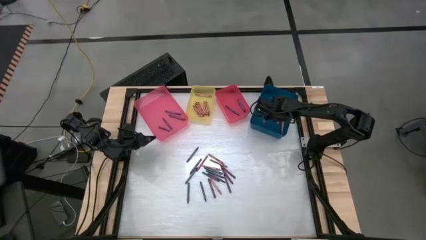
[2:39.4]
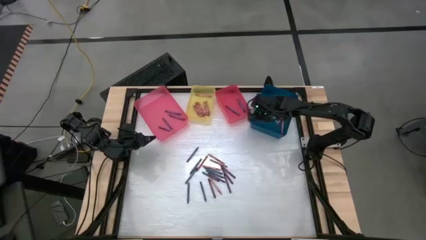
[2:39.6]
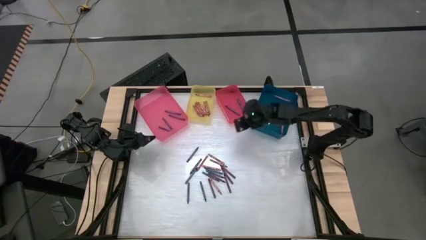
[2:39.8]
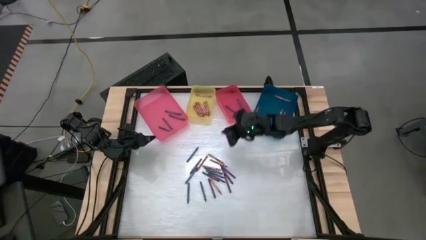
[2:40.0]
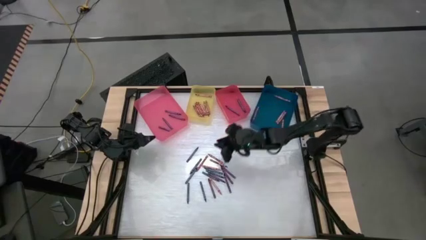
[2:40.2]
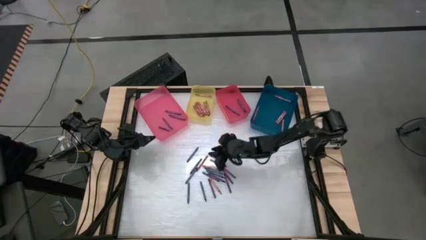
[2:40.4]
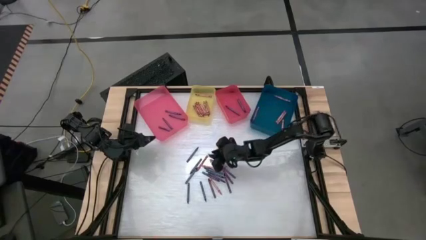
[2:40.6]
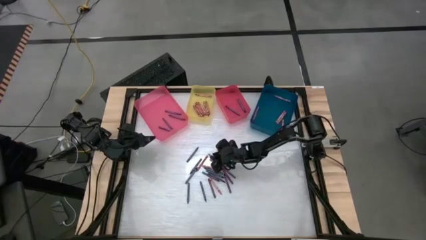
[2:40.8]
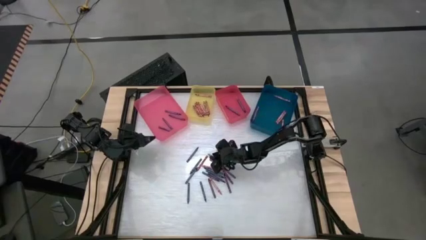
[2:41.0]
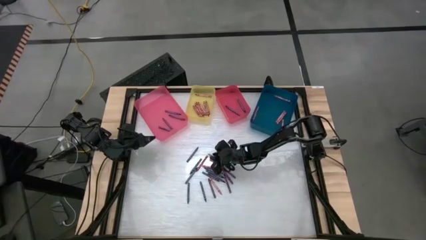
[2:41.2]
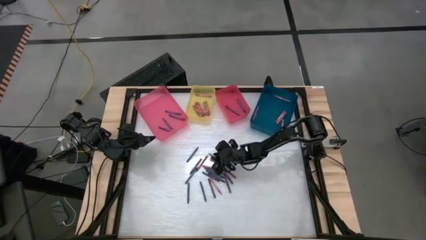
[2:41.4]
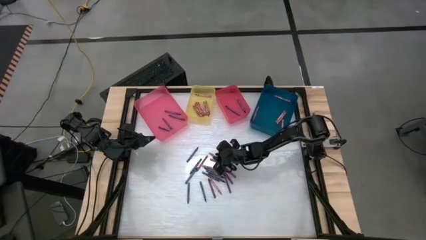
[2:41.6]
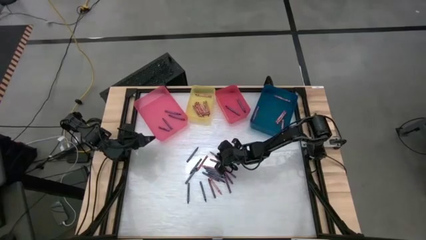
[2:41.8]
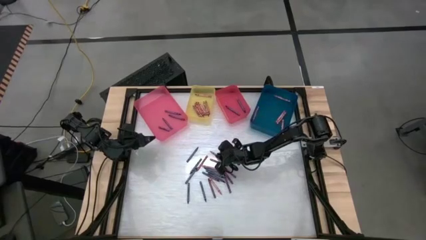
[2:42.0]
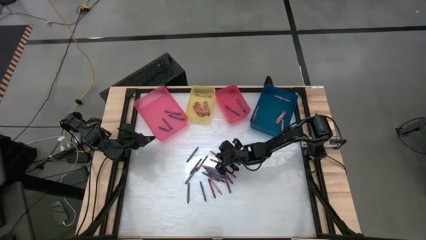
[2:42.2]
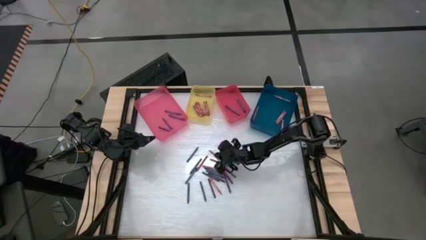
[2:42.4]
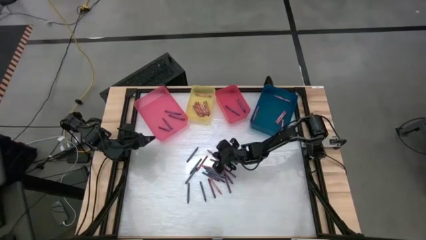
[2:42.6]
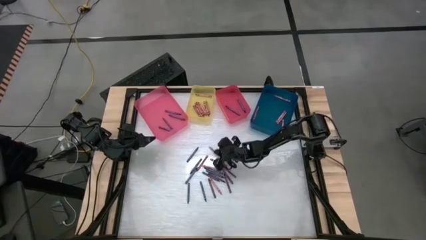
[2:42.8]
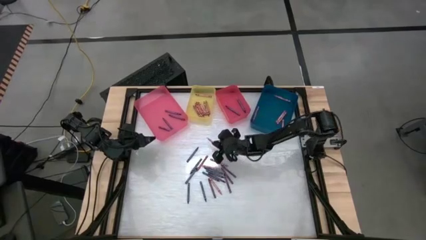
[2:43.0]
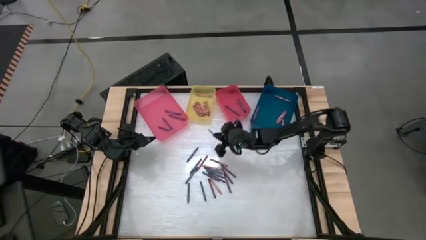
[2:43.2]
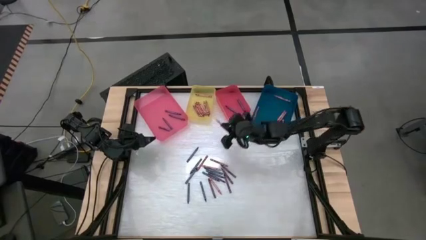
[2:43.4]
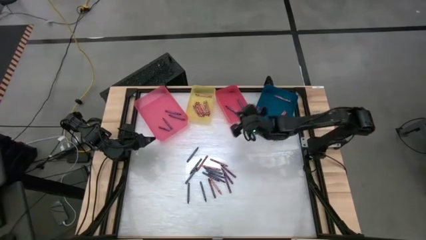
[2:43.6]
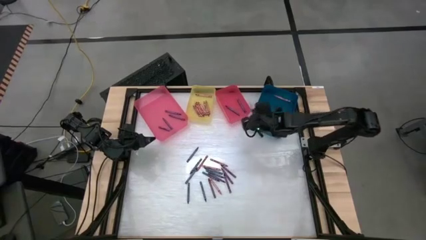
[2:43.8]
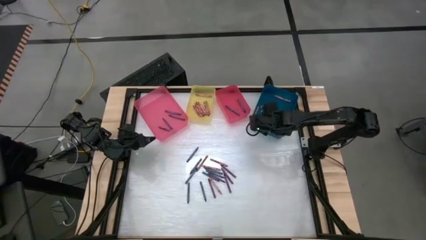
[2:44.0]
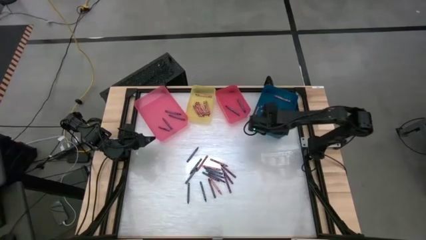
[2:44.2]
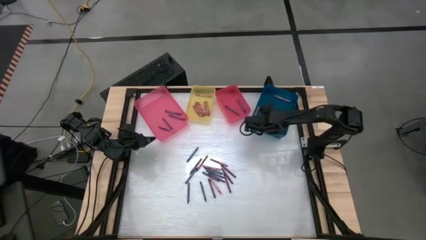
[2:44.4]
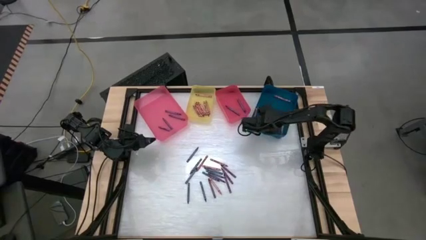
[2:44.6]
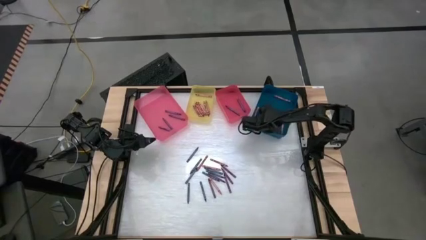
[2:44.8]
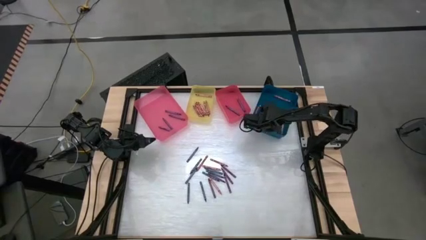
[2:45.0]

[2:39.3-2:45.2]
Task: Sort crayons
Put the pink crayon into the blue bin
